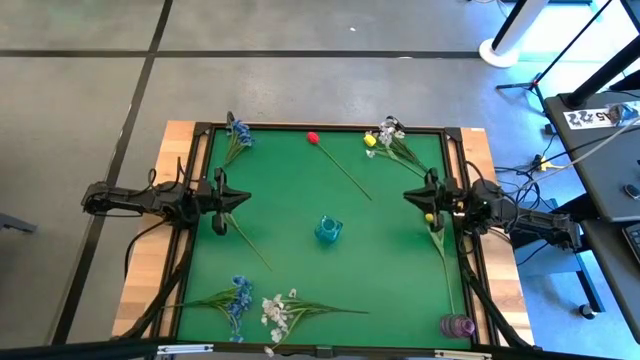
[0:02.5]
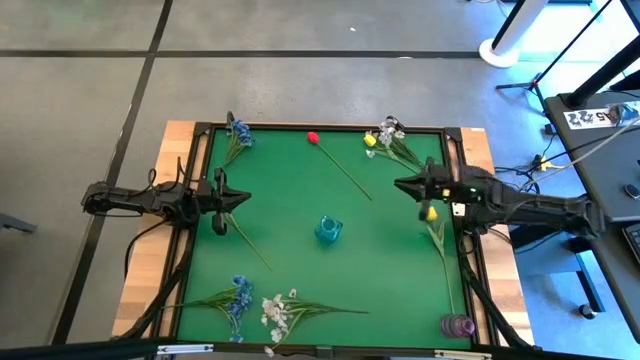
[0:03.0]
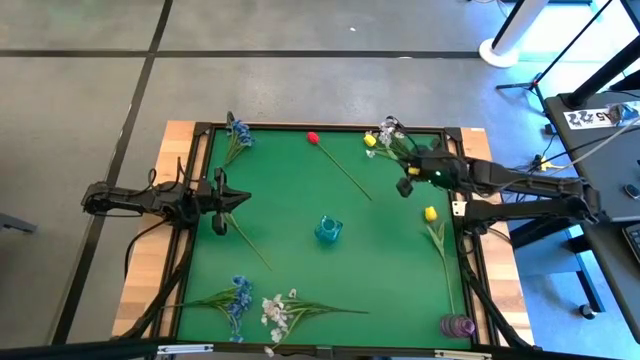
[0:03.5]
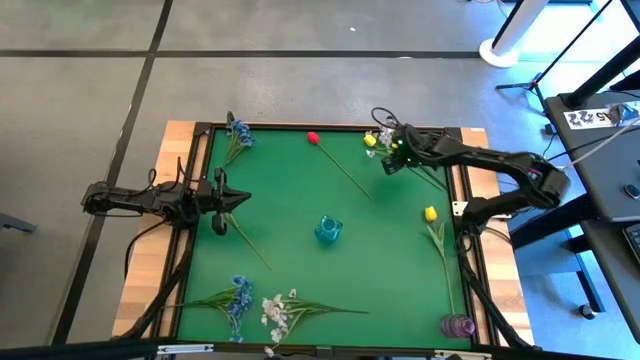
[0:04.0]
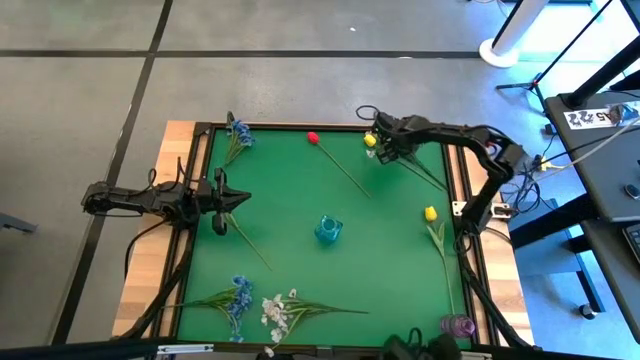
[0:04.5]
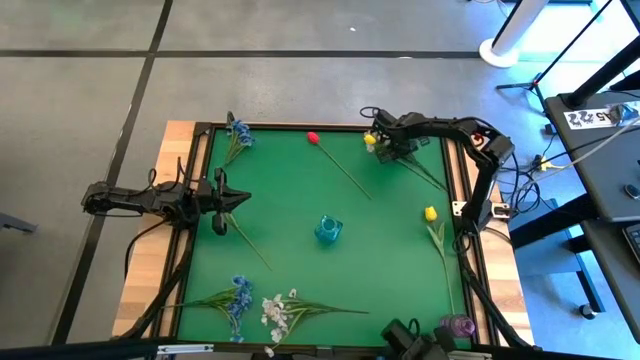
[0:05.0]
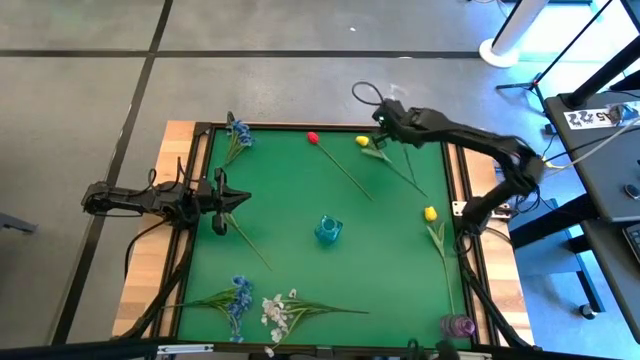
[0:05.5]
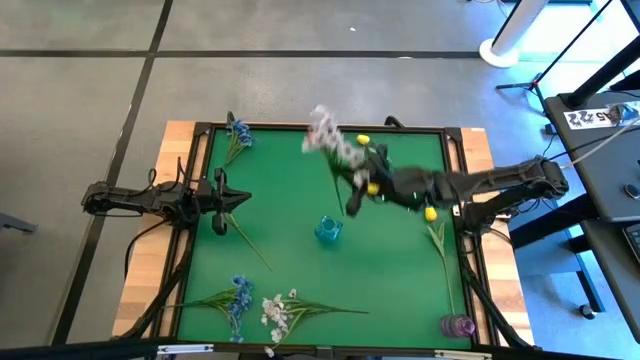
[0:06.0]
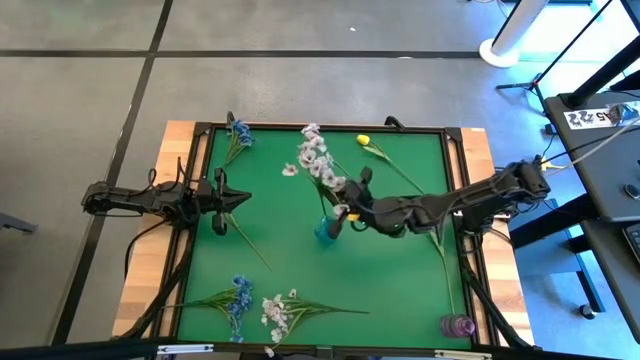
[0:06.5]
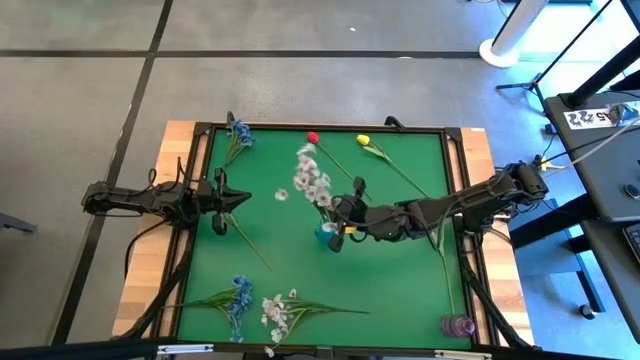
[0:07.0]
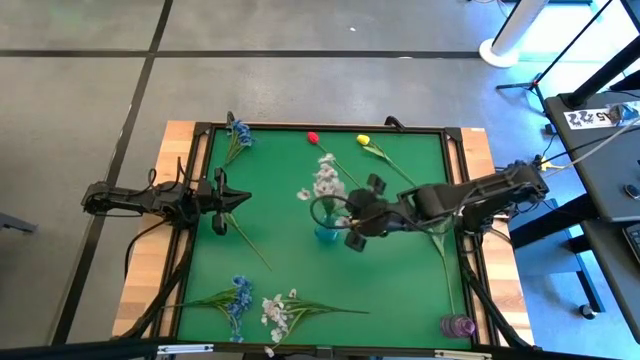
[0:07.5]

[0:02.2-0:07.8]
Task: Sort flowers into vase by color
Put the top white flowers into the blue flower vase

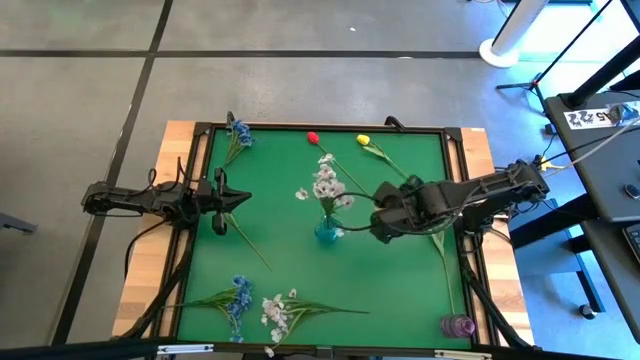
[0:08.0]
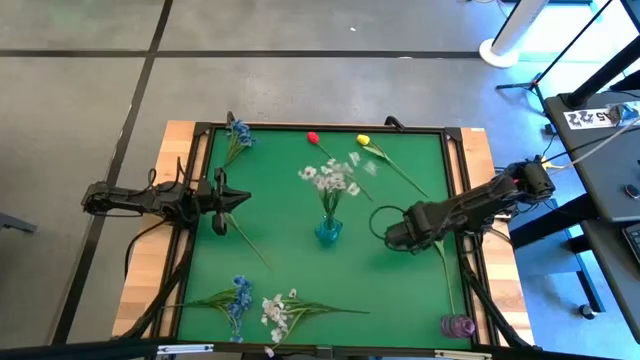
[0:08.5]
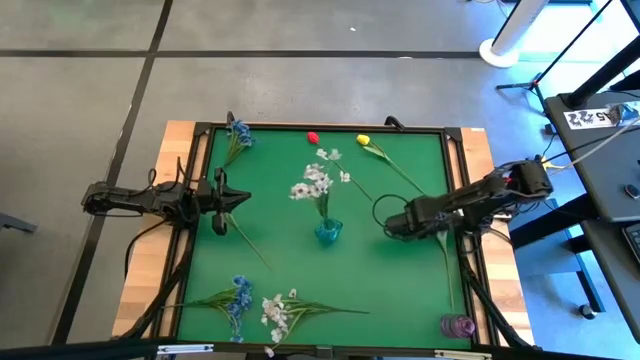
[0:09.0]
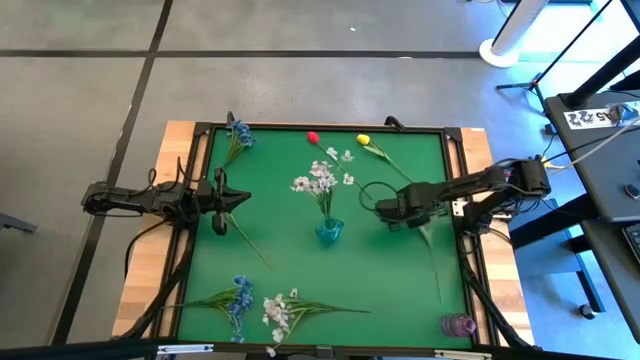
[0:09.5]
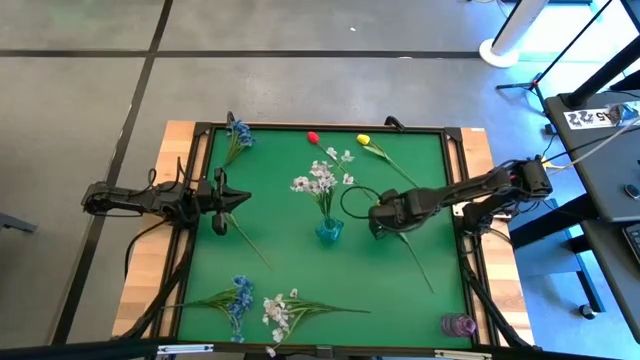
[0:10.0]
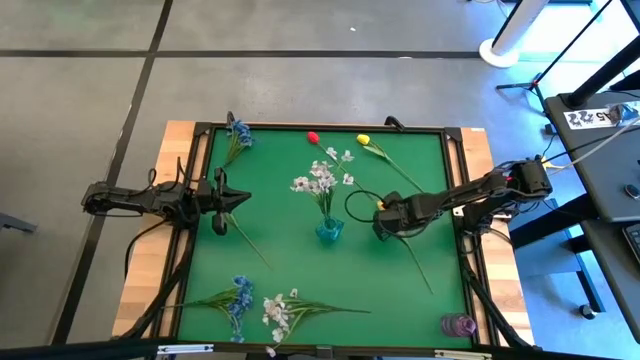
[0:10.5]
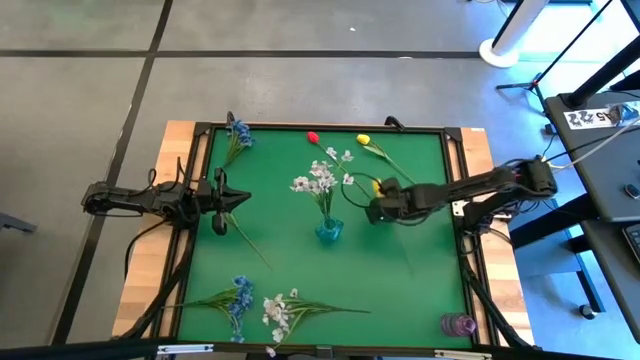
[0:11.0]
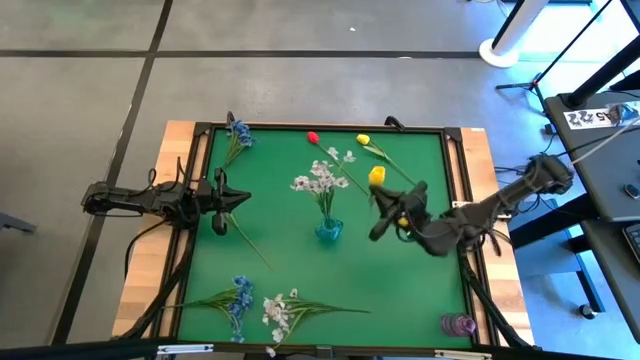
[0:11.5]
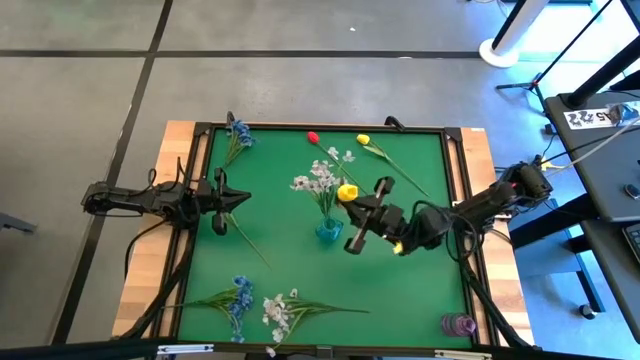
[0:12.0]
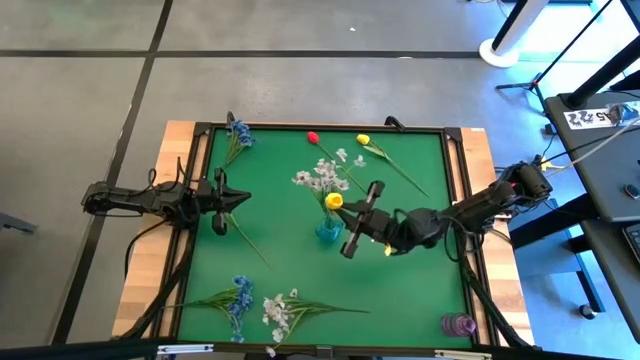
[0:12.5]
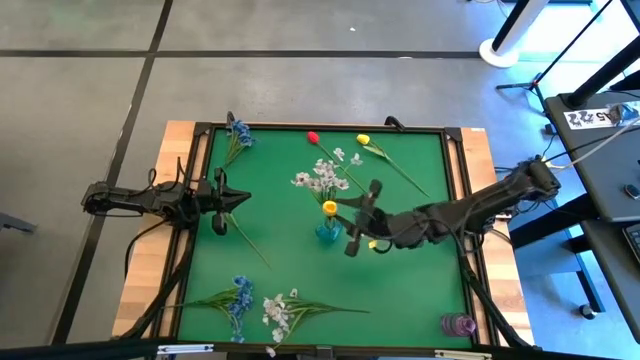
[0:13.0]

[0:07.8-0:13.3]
Put the bottom yellow flower into the blue flower vase

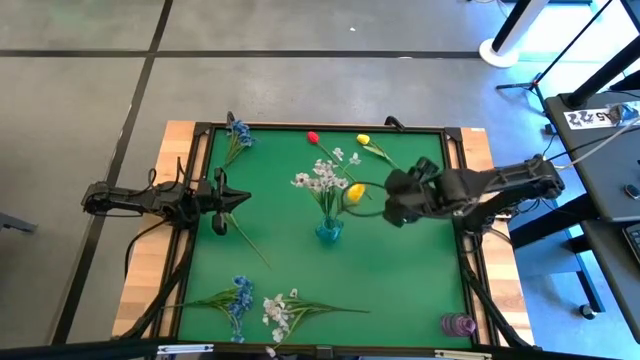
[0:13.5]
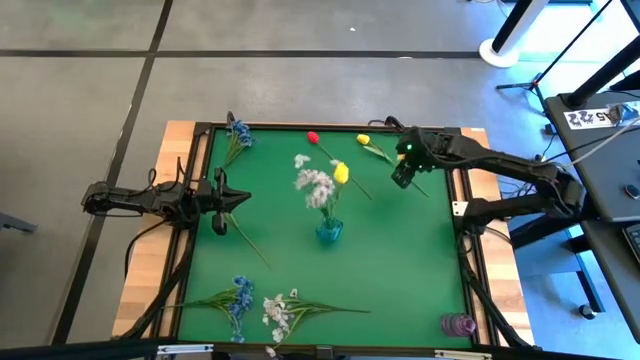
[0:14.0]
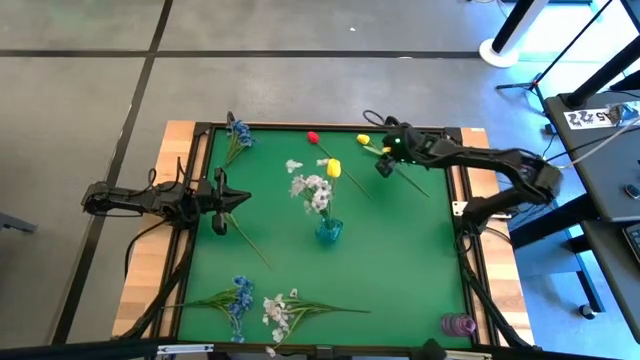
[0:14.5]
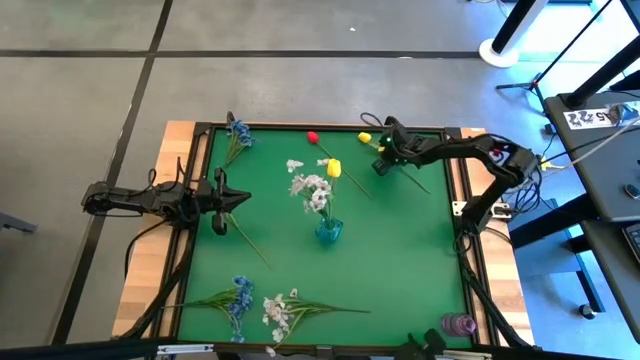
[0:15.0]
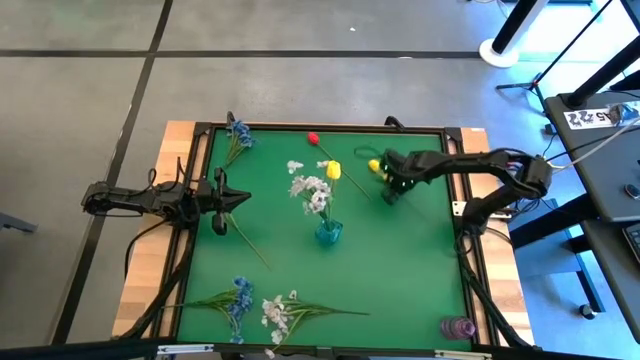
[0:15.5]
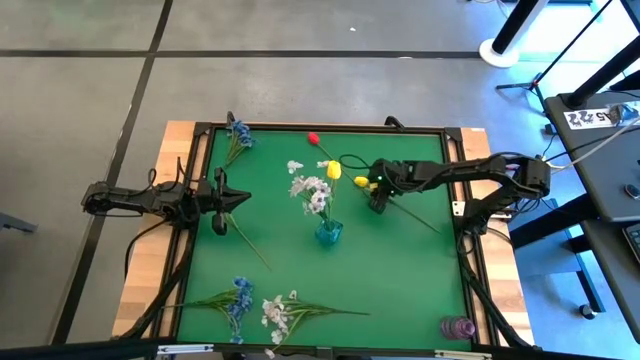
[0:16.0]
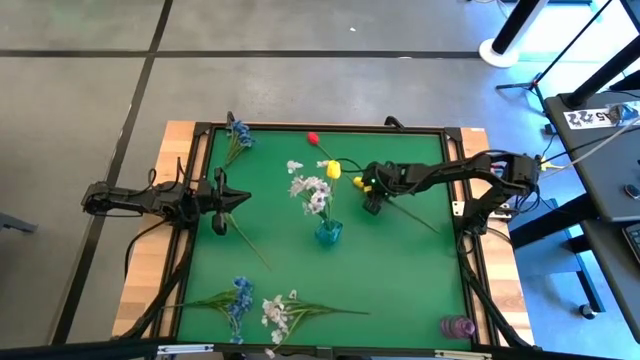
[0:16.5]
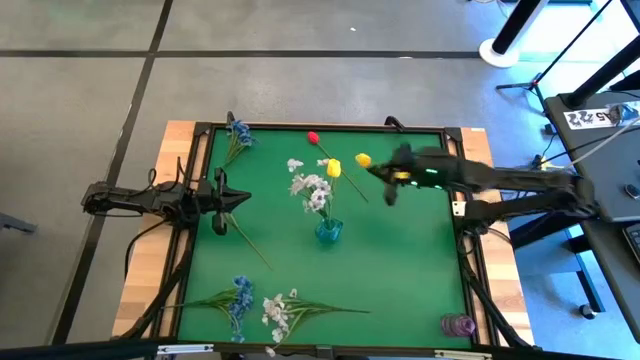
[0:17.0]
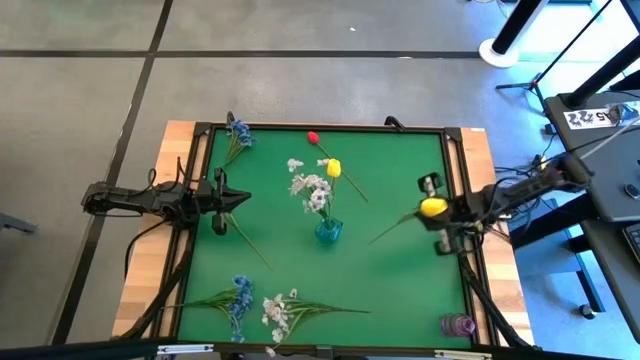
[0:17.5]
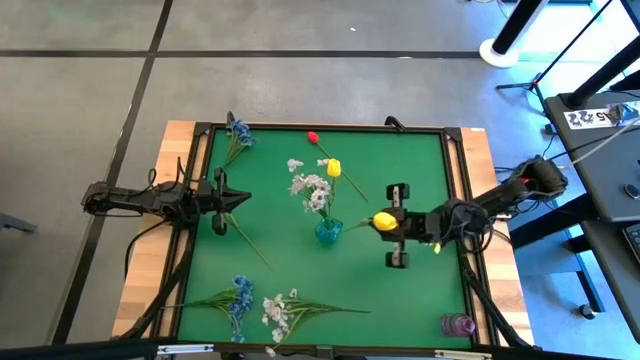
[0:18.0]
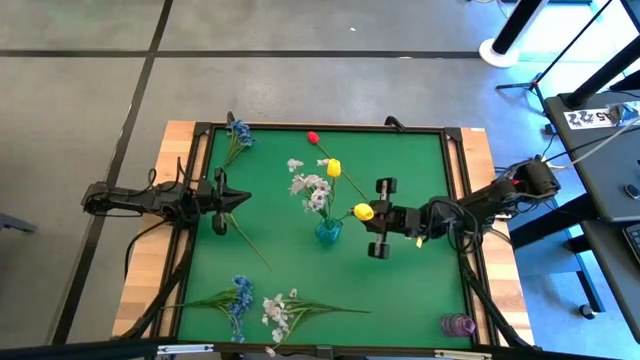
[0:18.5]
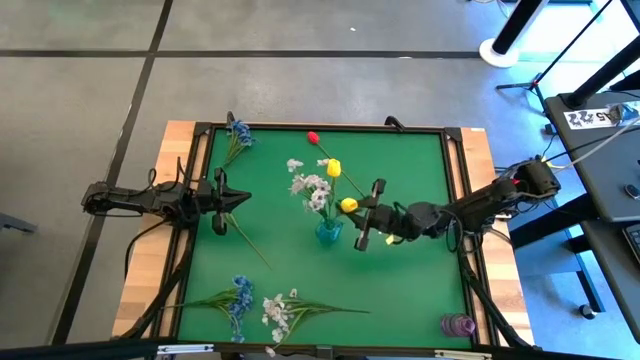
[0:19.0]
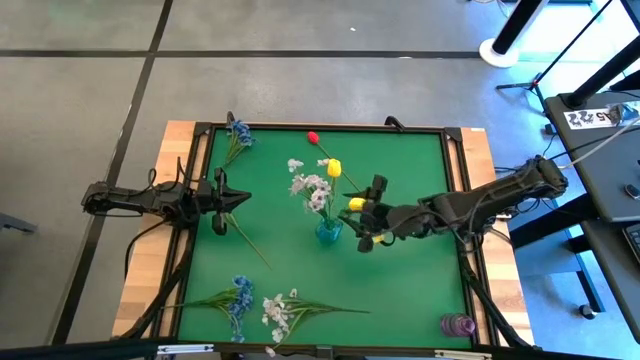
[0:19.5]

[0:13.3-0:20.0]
Put the yellow flower into the blue flower vase

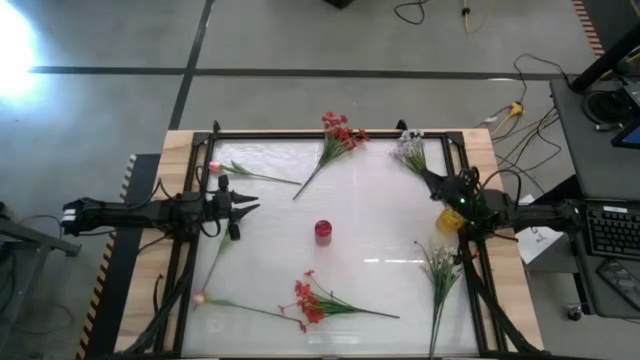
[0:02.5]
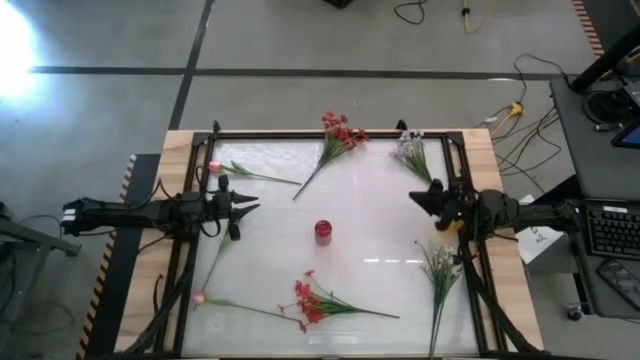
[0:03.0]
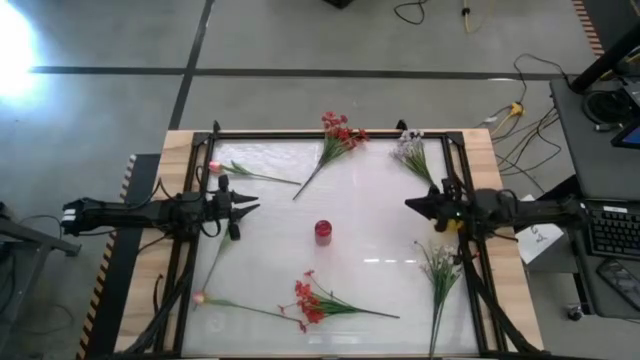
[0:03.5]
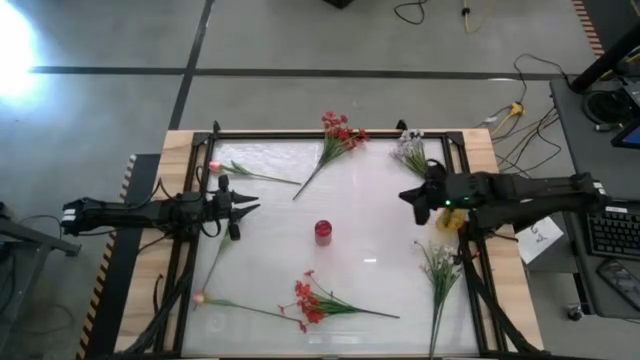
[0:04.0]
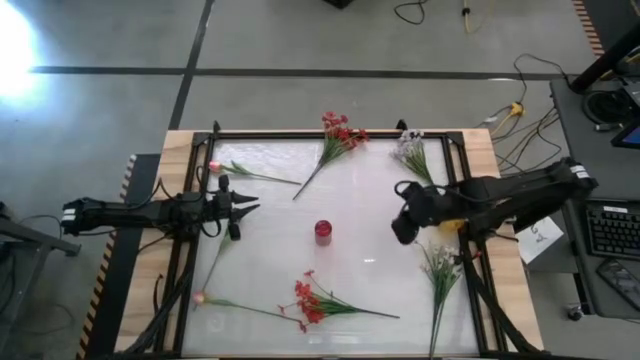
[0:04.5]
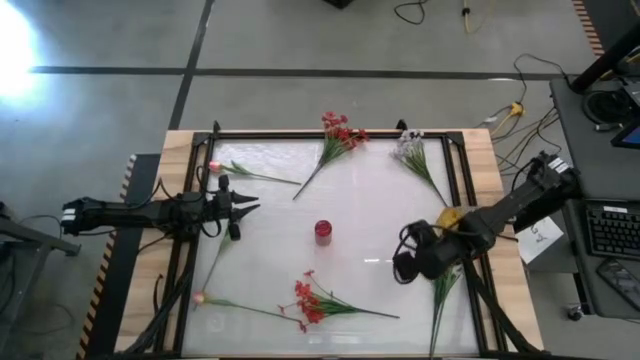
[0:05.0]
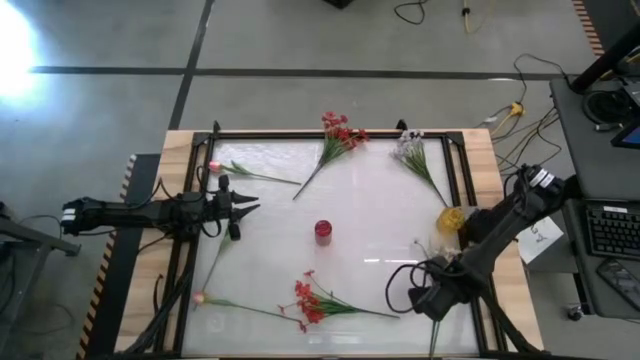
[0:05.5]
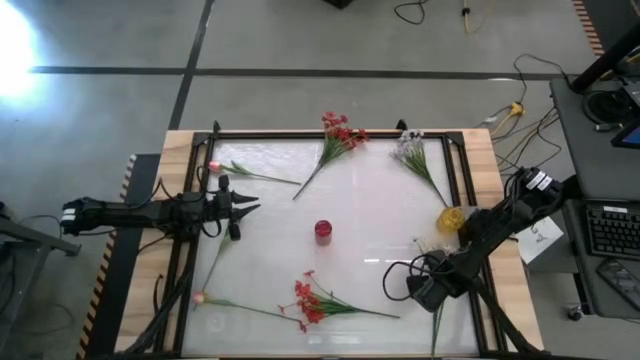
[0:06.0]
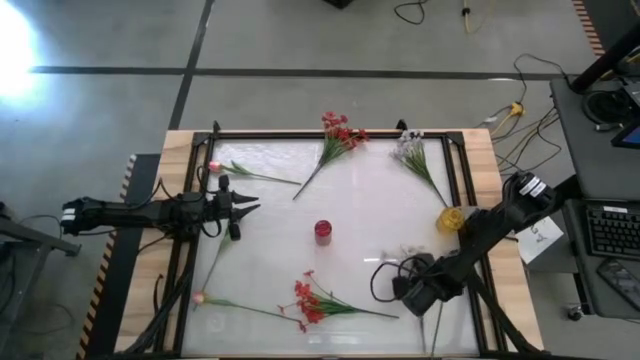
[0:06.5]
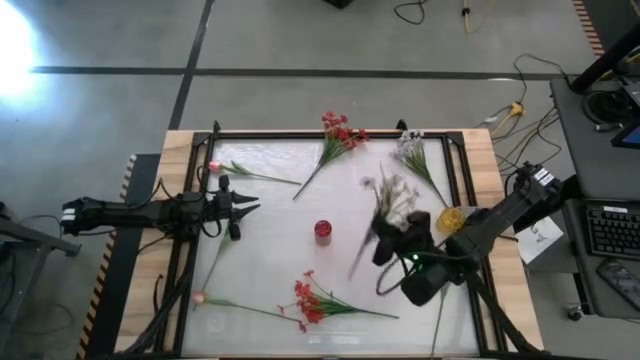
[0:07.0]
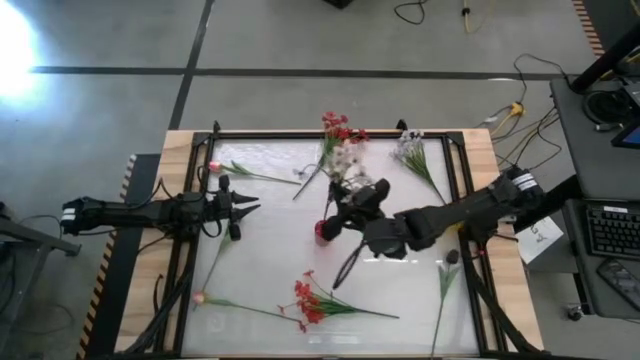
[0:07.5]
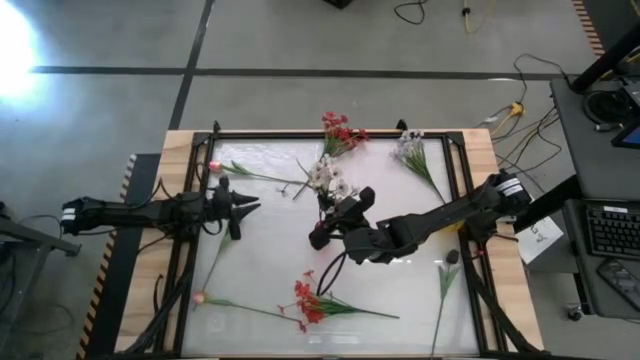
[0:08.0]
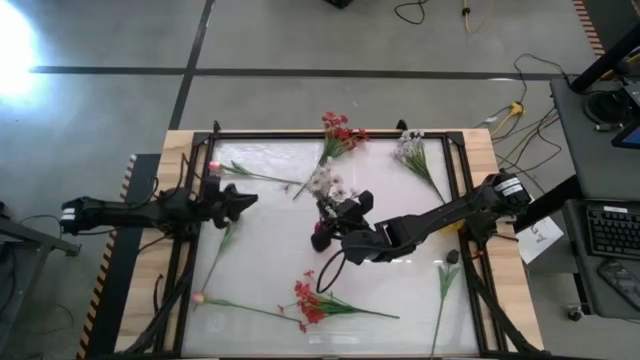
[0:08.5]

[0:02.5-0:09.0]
Task: Sort flowers into vase by color
Put the bottom white flowers into the red vase
